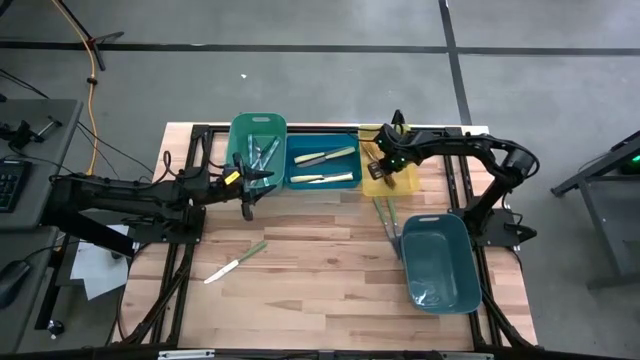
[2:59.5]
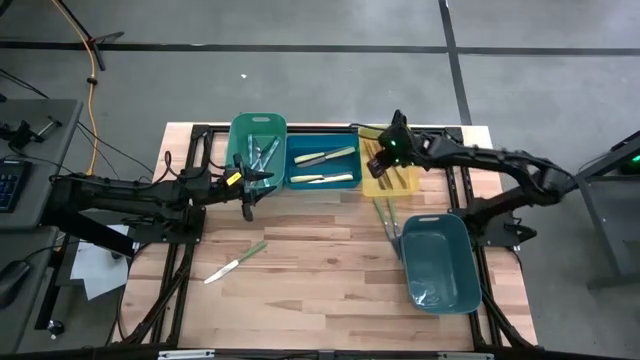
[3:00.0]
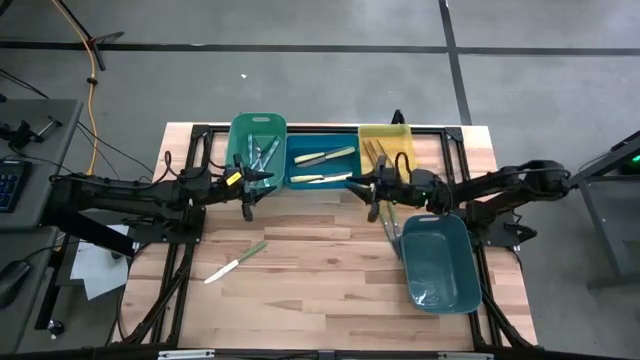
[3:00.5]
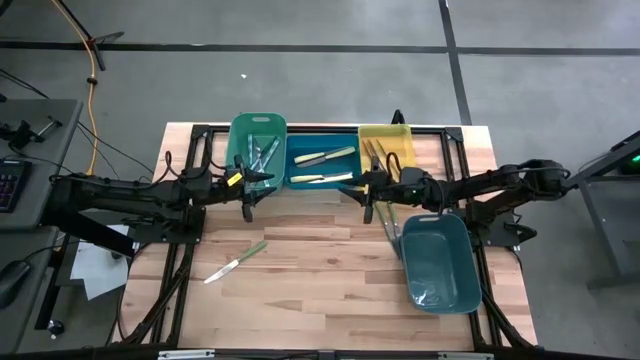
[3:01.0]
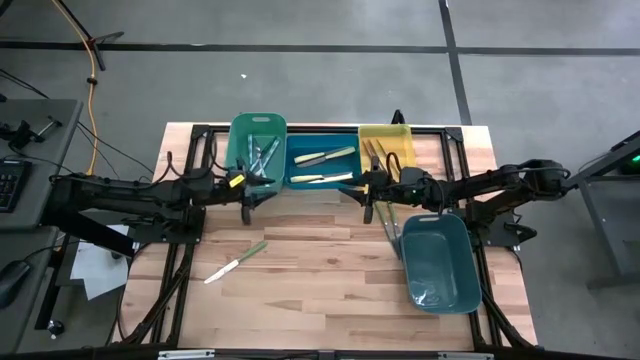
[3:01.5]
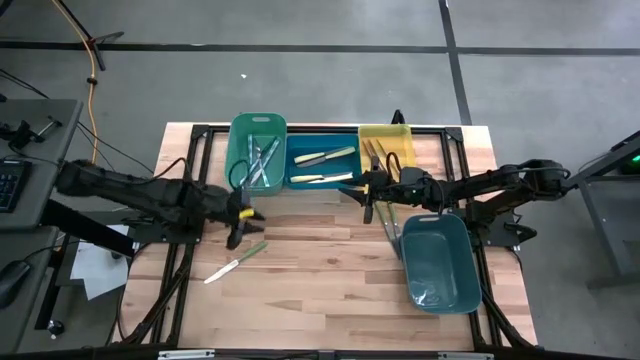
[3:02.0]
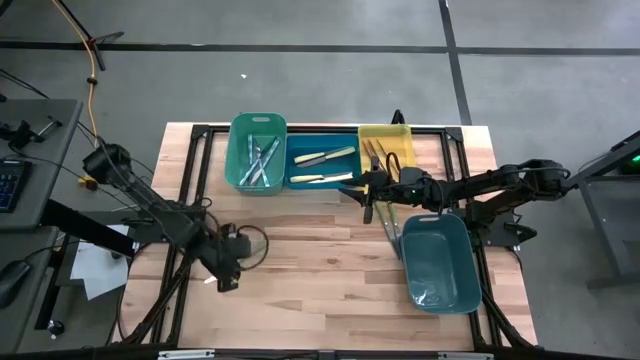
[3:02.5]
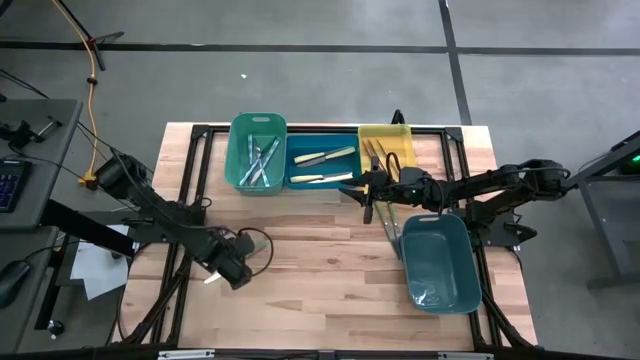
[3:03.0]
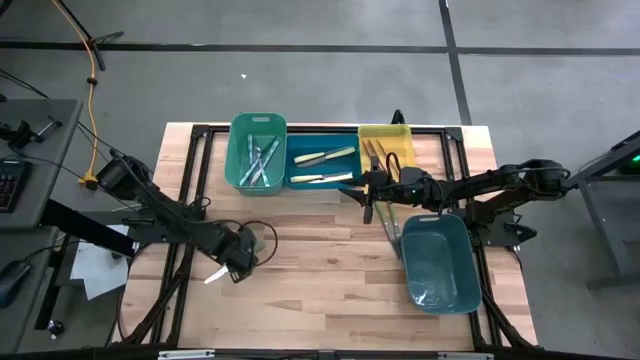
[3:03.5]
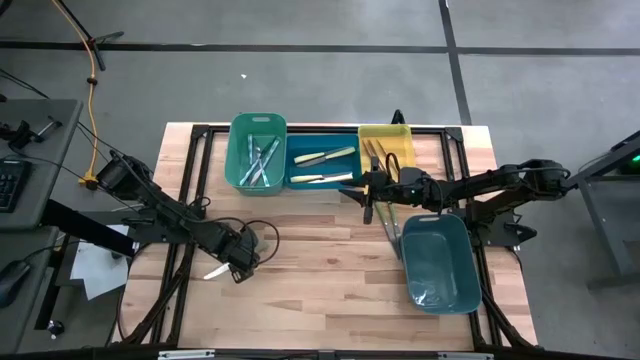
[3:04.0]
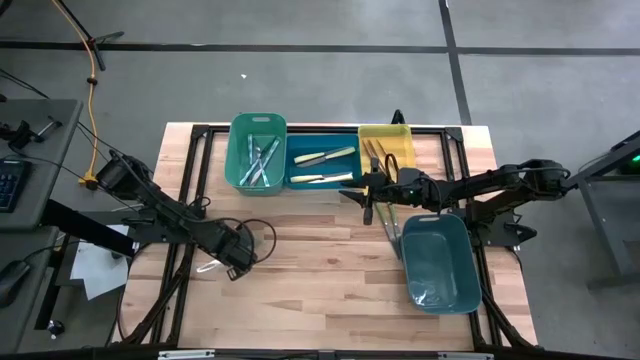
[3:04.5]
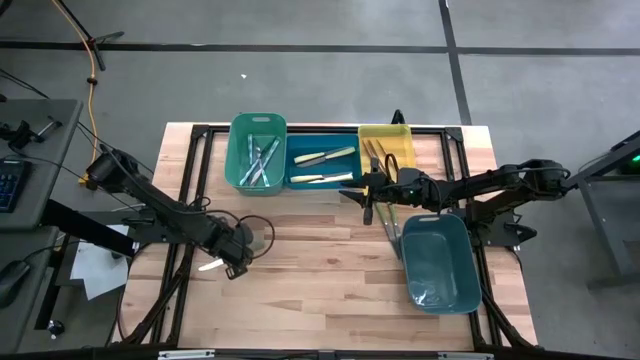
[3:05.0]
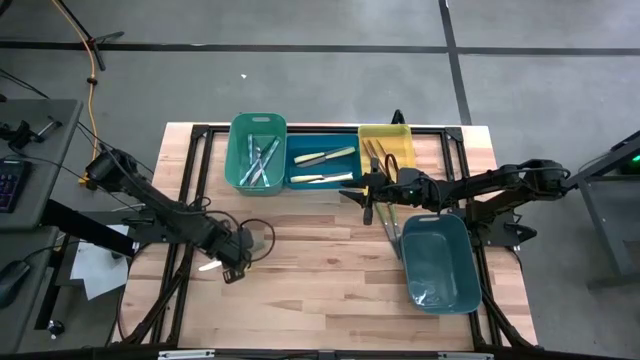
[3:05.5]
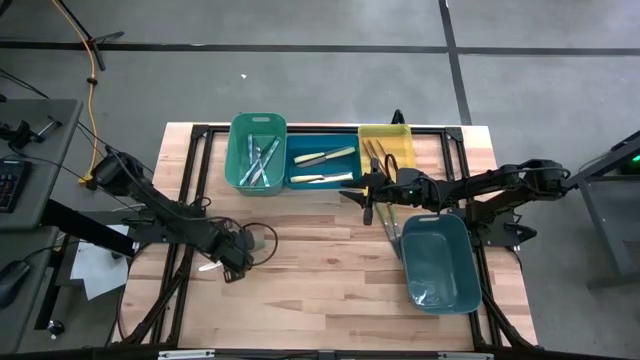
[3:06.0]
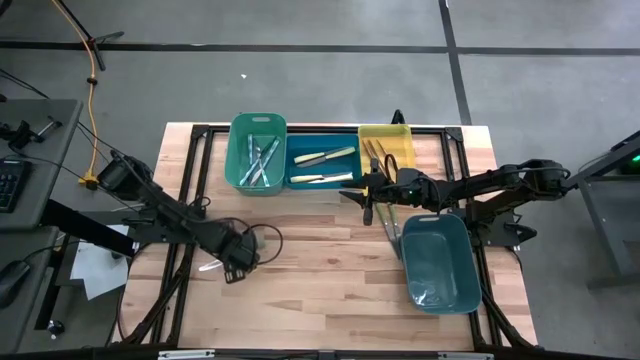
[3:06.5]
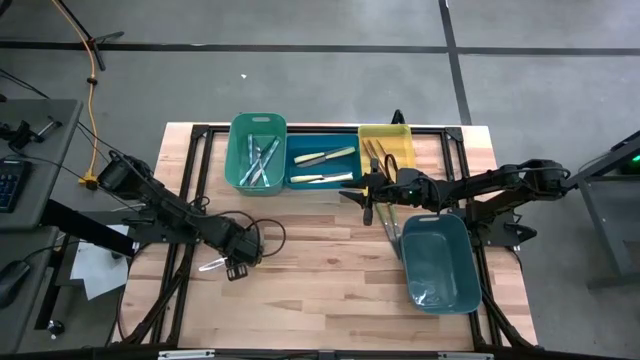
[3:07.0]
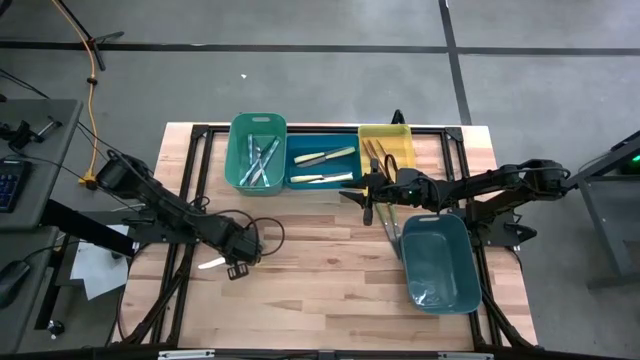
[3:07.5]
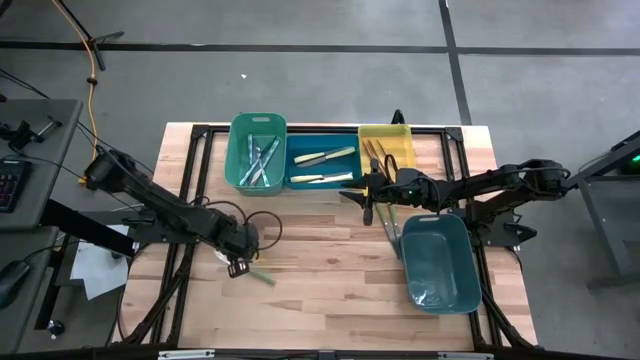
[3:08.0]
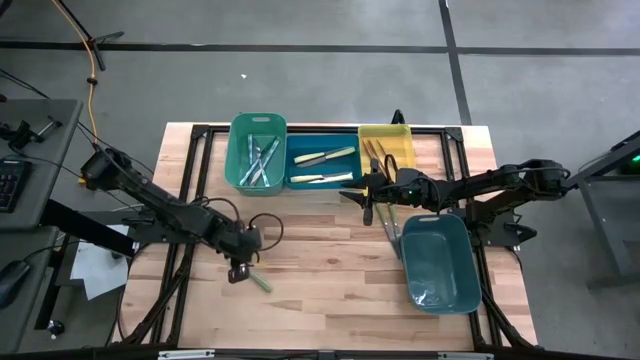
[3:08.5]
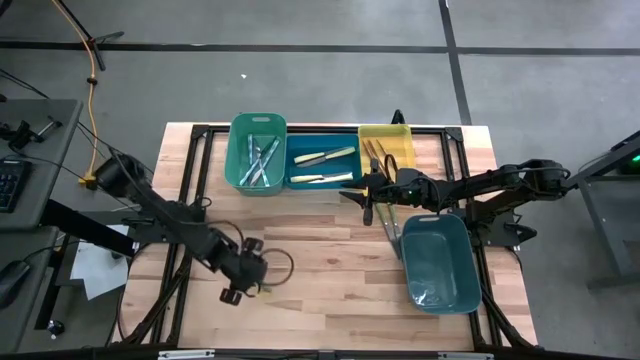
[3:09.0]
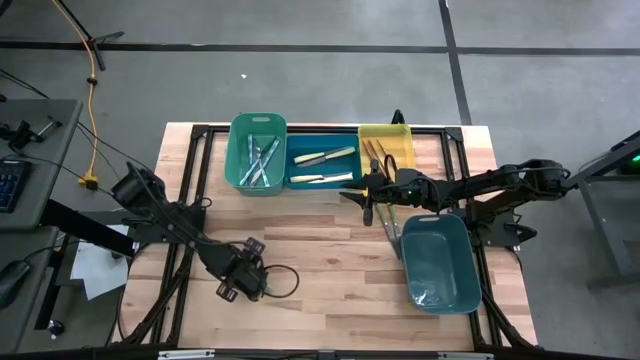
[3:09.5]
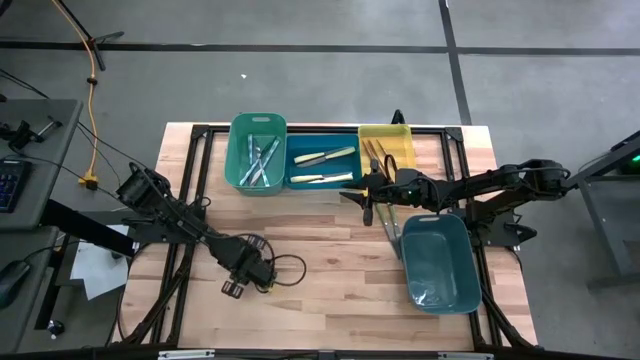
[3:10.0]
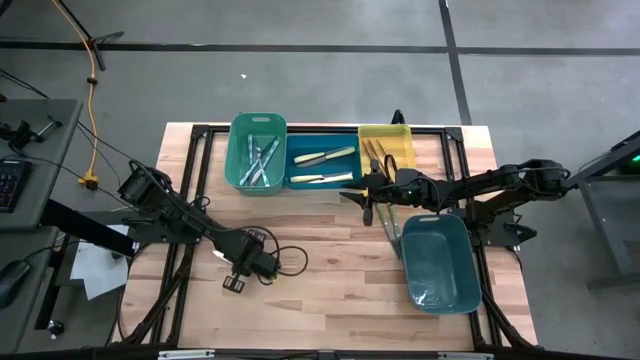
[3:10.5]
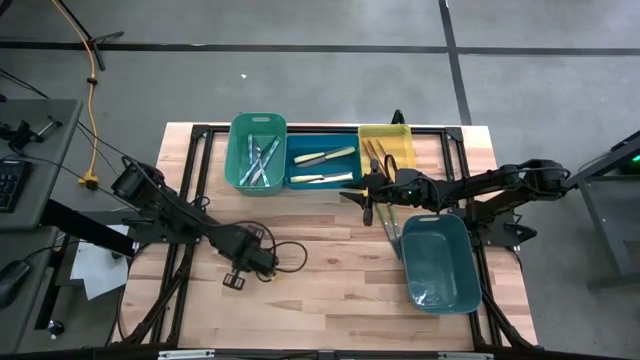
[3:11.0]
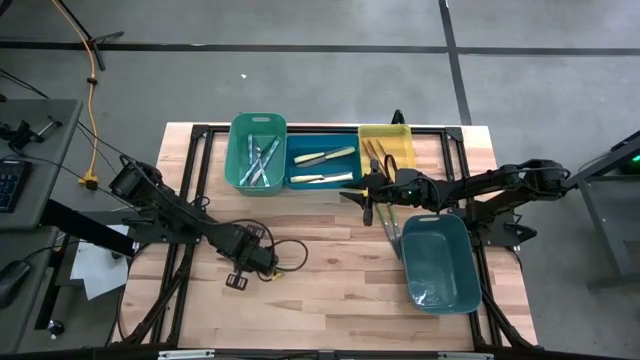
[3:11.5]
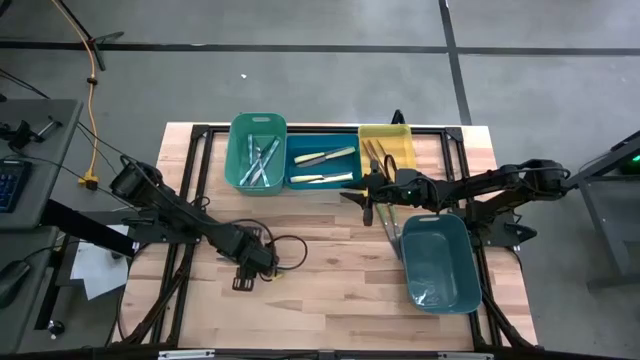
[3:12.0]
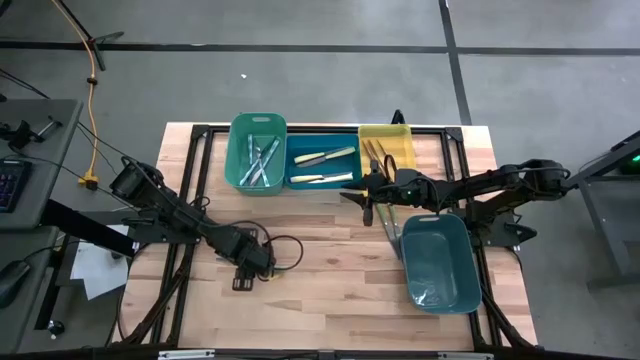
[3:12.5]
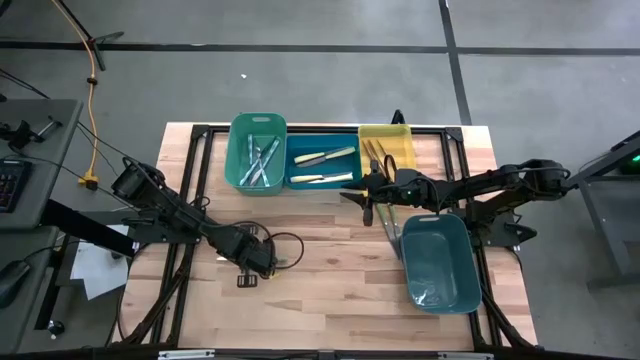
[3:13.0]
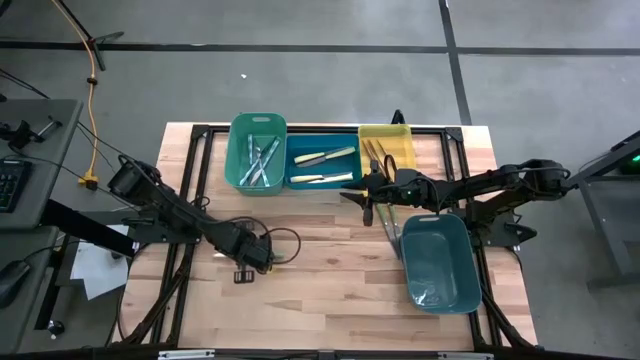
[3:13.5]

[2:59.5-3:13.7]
Task: Sort silverware by color (type)
Put the green knife into the green bin

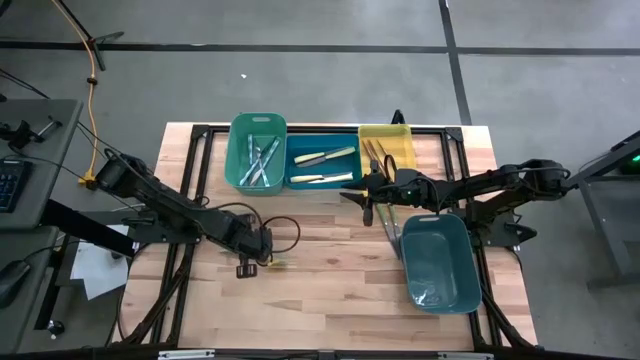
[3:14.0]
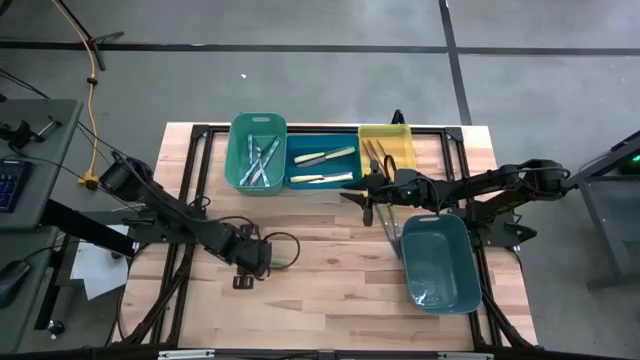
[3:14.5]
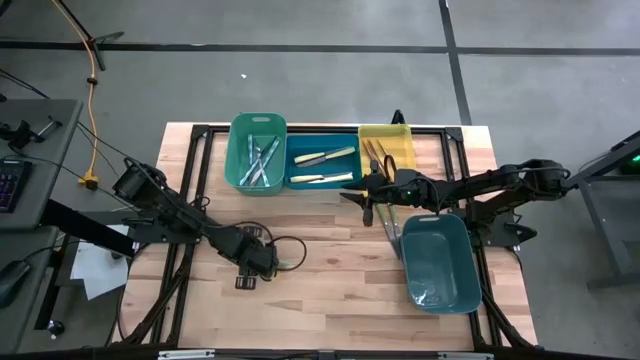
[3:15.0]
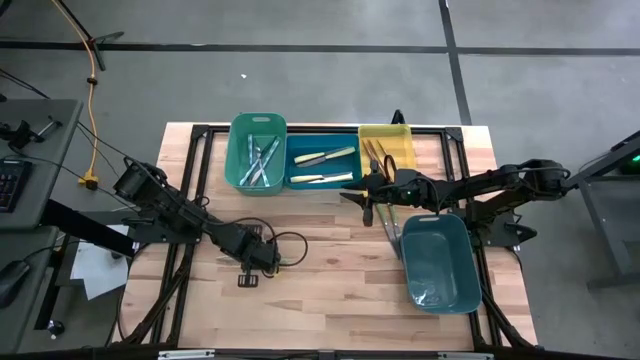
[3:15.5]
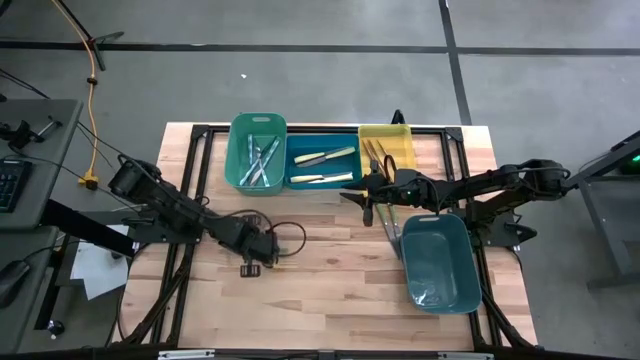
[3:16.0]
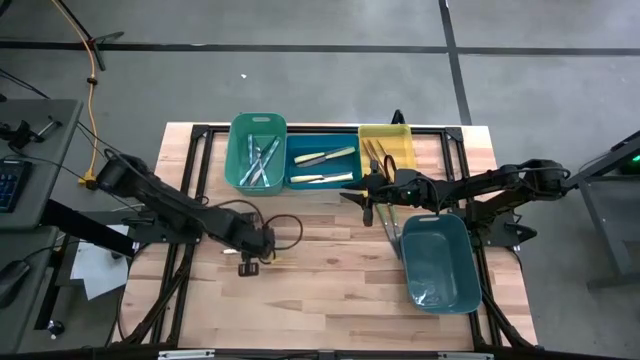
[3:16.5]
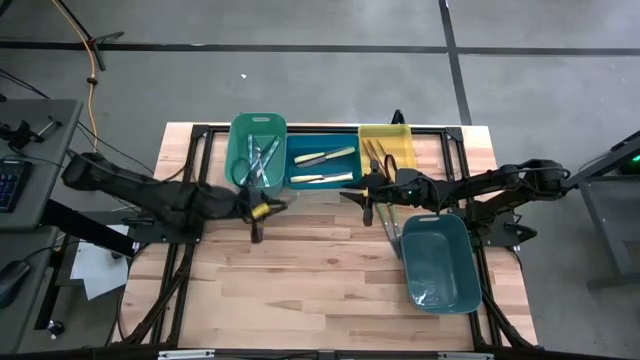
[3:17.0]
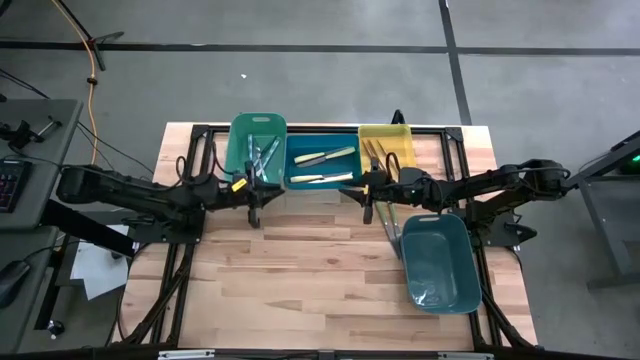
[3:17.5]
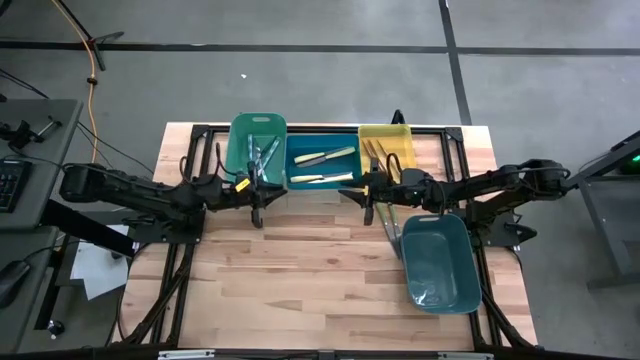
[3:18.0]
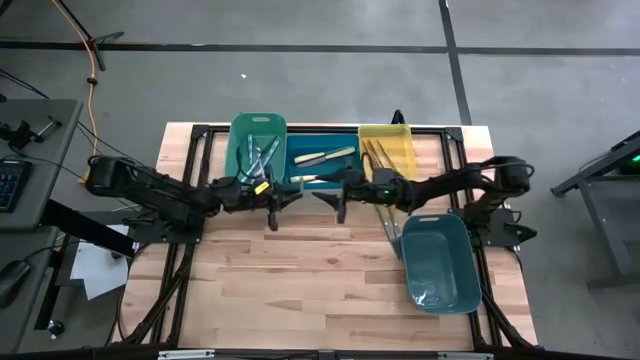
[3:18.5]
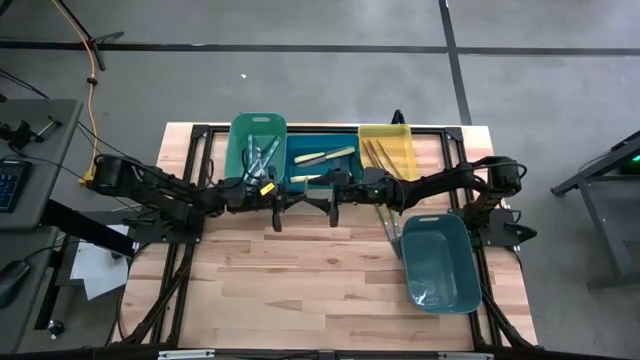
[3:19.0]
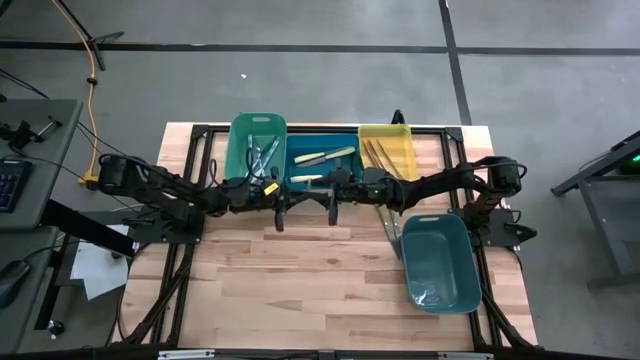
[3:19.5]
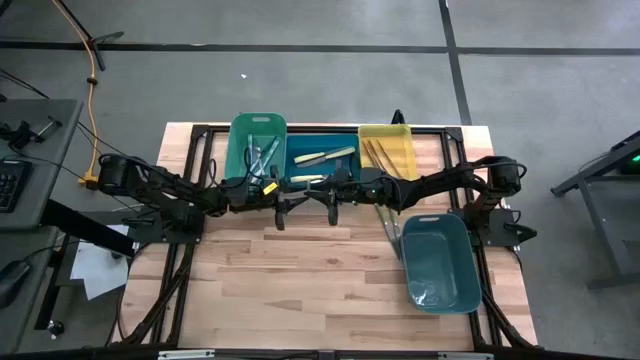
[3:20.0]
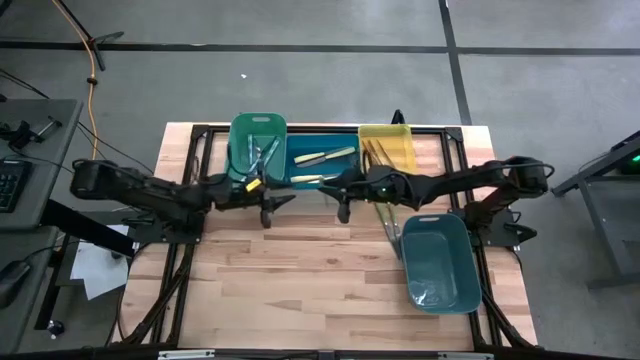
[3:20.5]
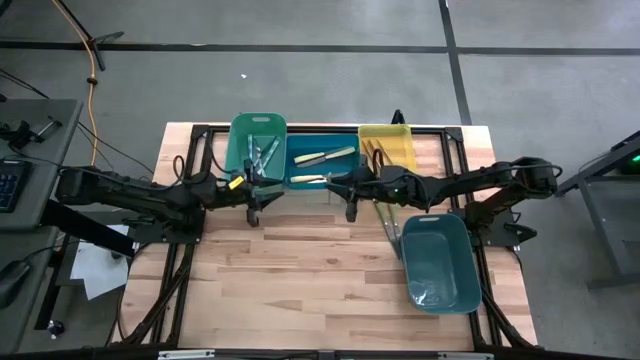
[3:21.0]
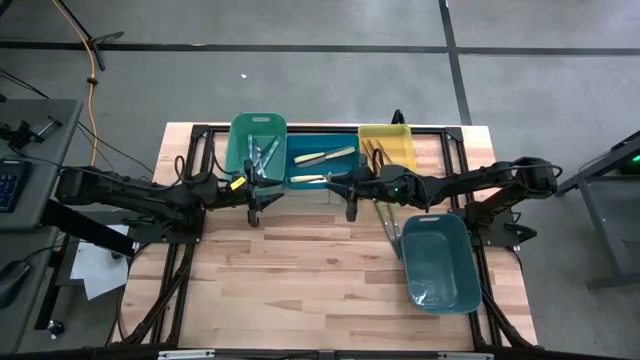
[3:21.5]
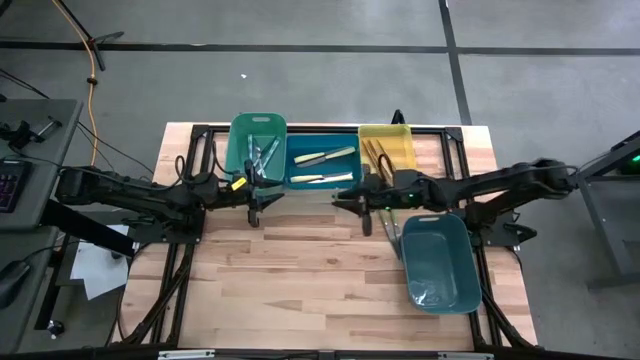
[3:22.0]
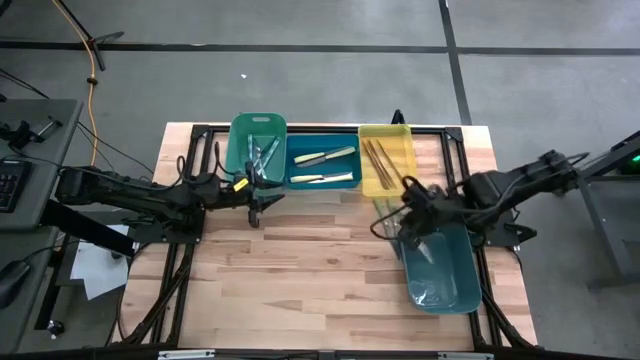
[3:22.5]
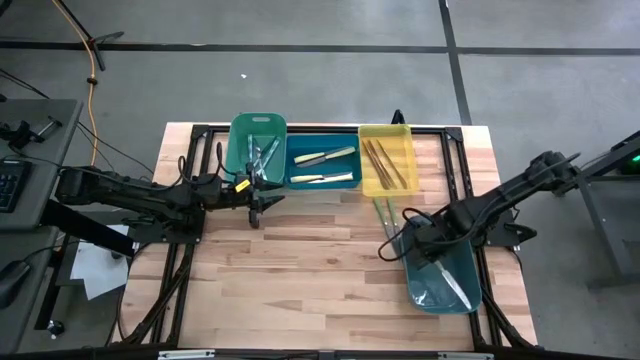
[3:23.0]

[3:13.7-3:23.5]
Put the green knife into the green bin
